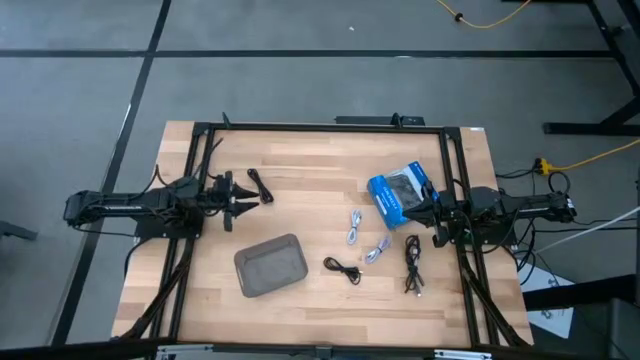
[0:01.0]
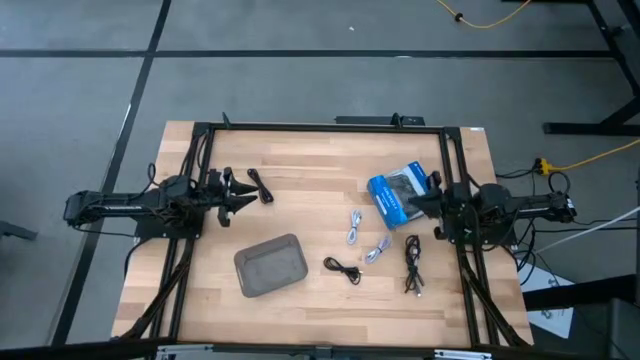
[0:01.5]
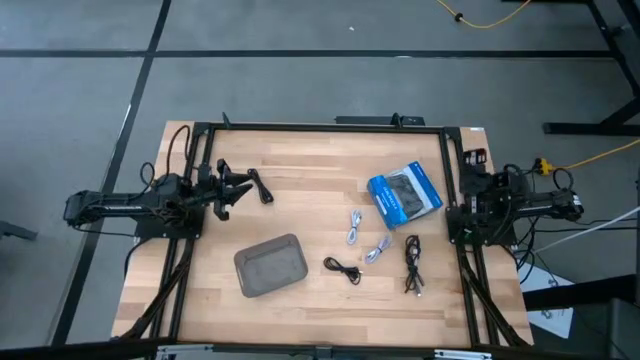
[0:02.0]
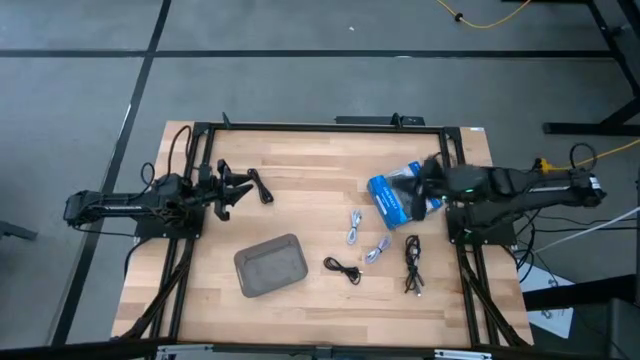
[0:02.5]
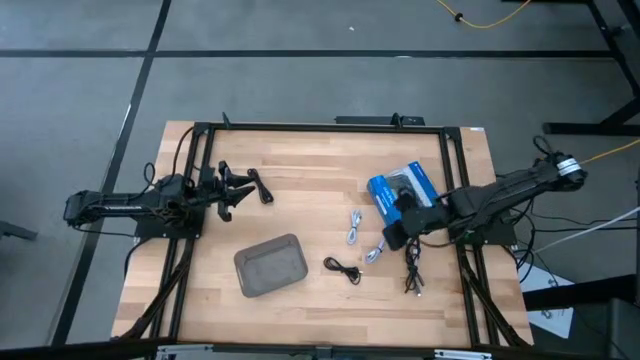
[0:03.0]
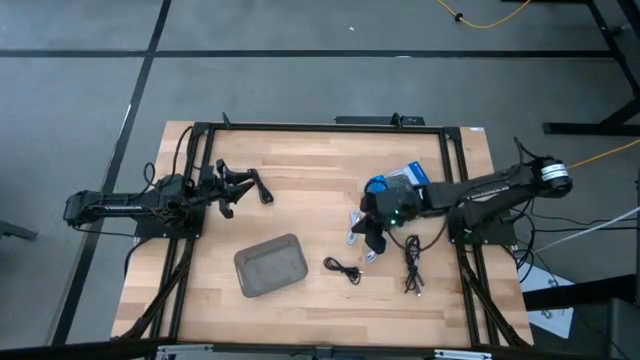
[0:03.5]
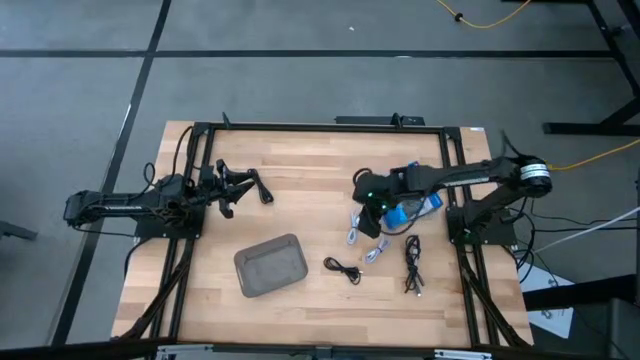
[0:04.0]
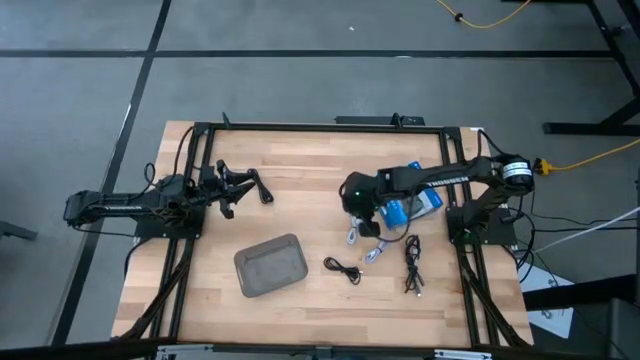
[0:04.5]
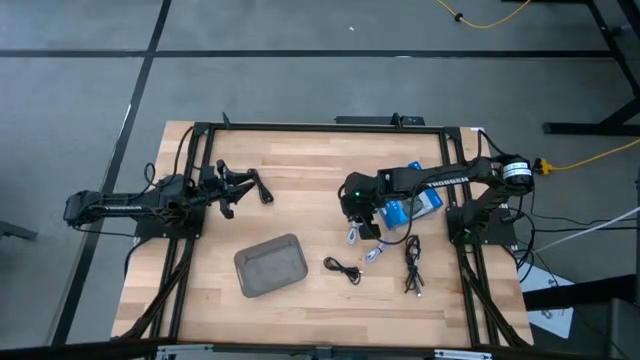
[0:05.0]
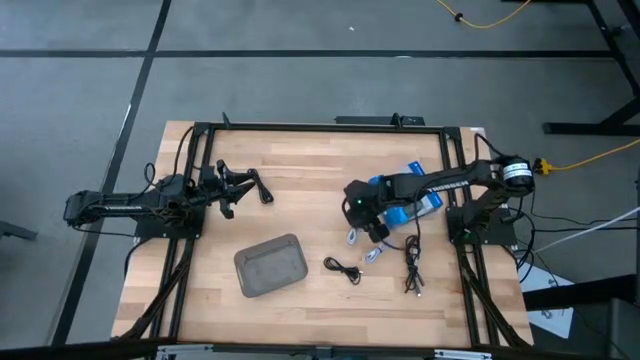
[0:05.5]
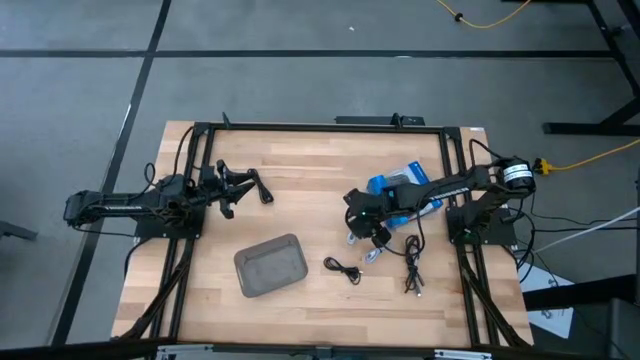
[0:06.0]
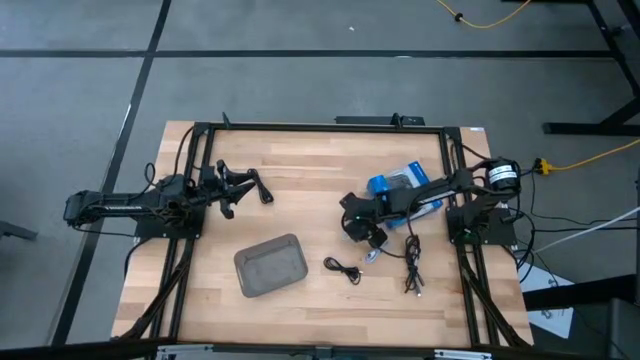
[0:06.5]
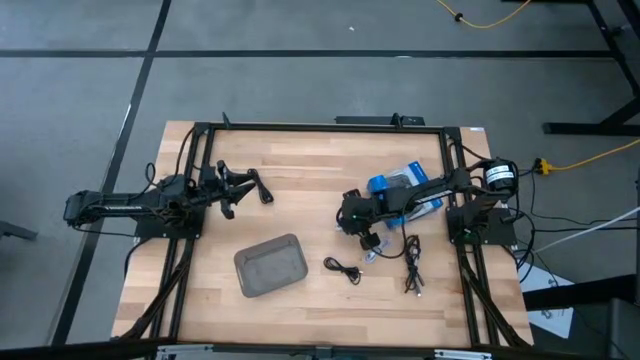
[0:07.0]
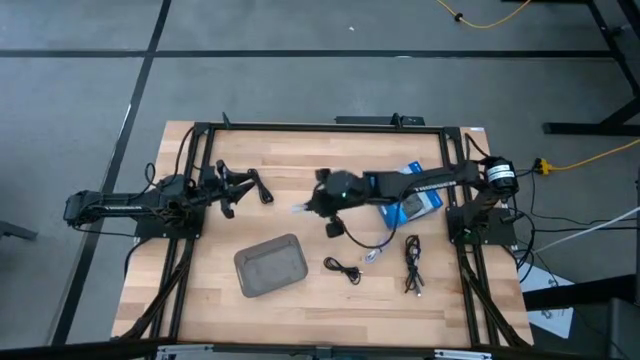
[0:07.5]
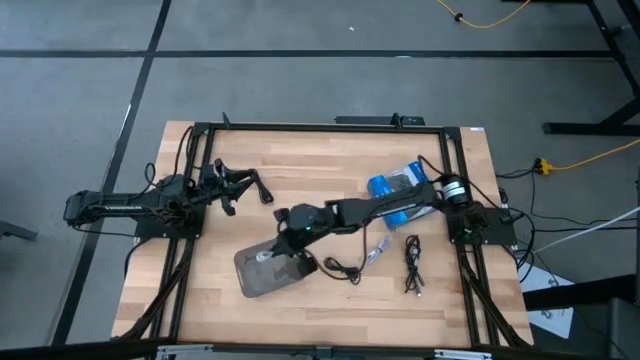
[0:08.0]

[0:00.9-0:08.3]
Task: Pick and place USB-C Cables
Put the white charger cable into the black bin

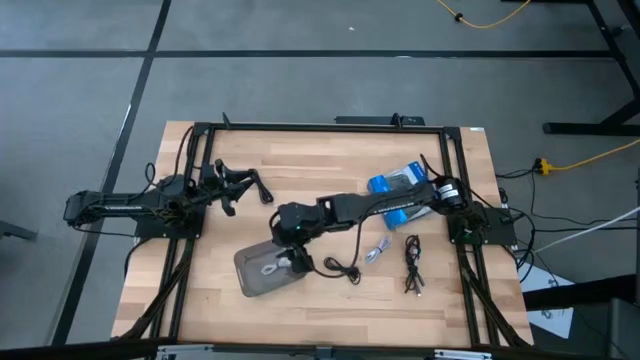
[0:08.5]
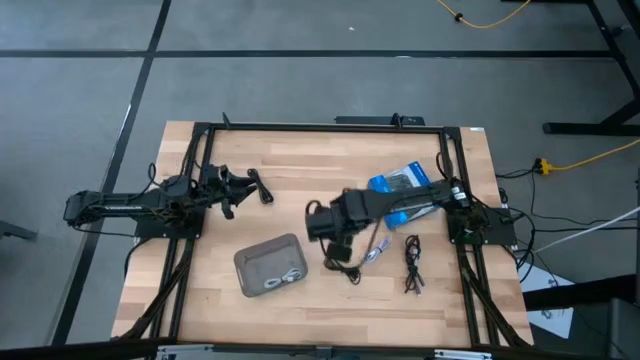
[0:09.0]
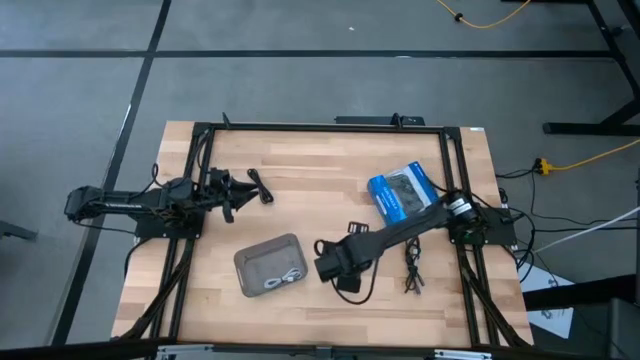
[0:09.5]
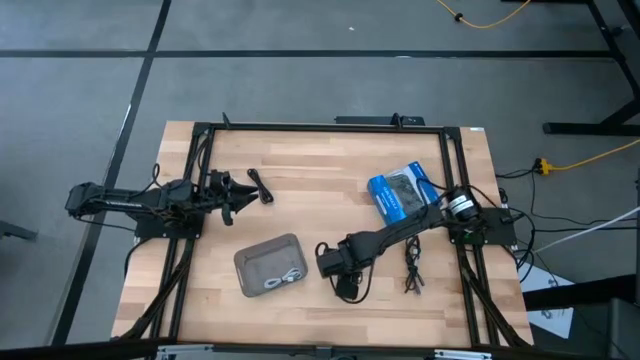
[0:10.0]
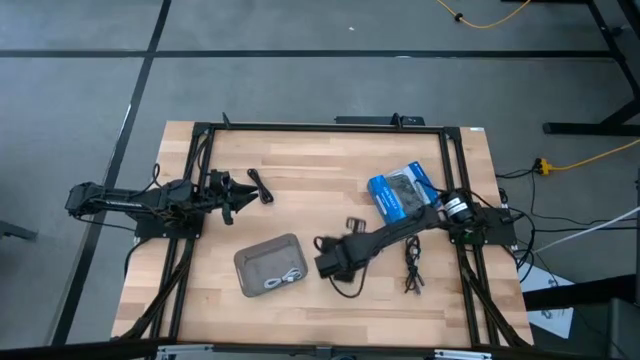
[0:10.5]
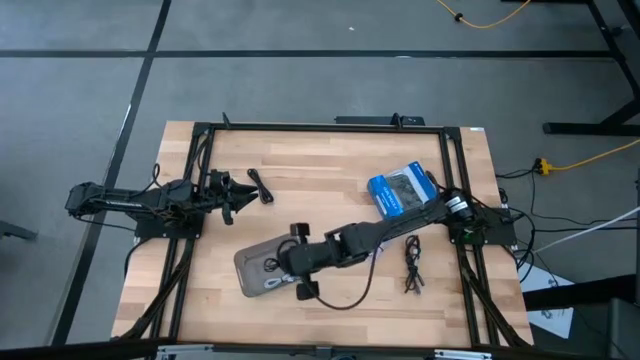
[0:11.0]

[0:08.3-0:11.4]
Put the bottom left black charger cable into the black bin

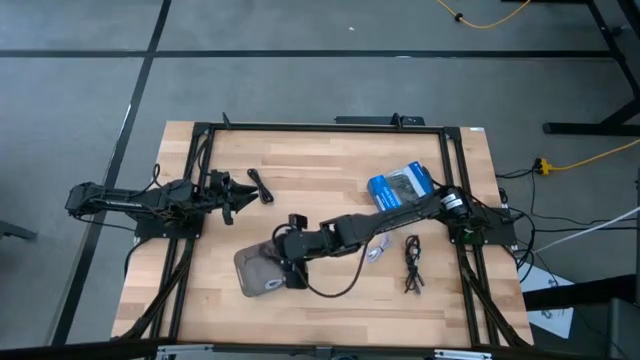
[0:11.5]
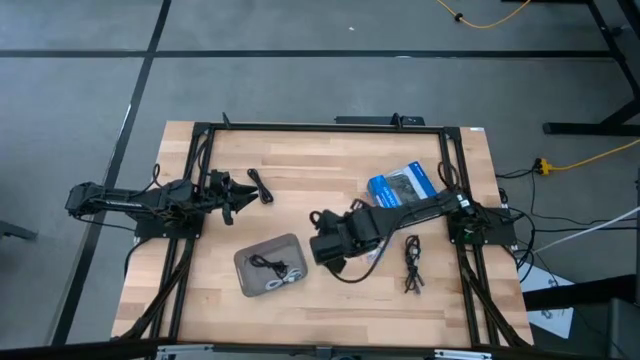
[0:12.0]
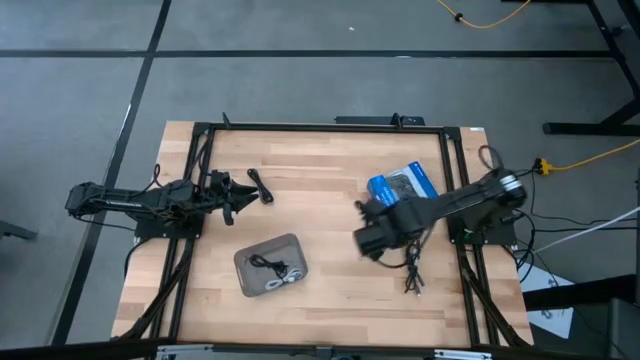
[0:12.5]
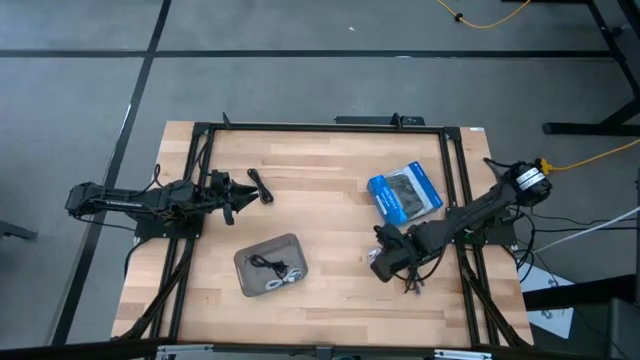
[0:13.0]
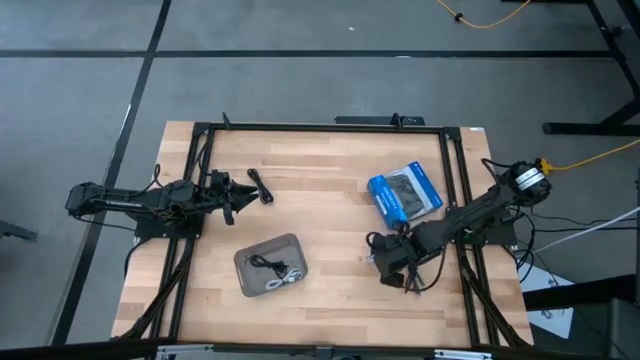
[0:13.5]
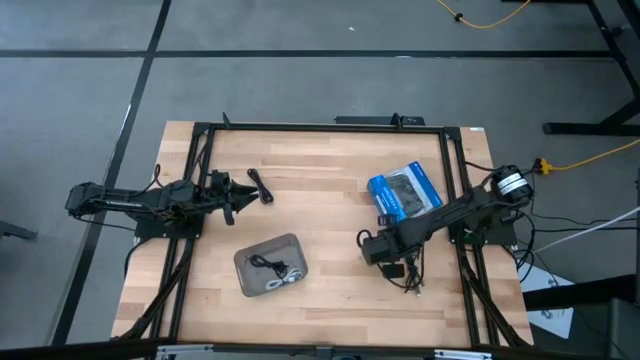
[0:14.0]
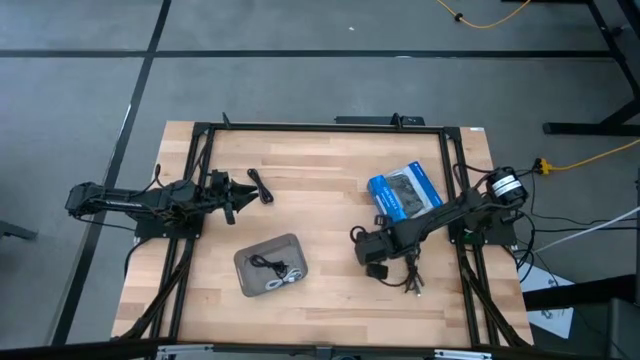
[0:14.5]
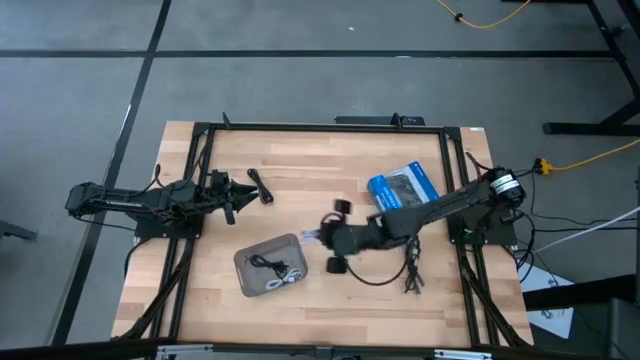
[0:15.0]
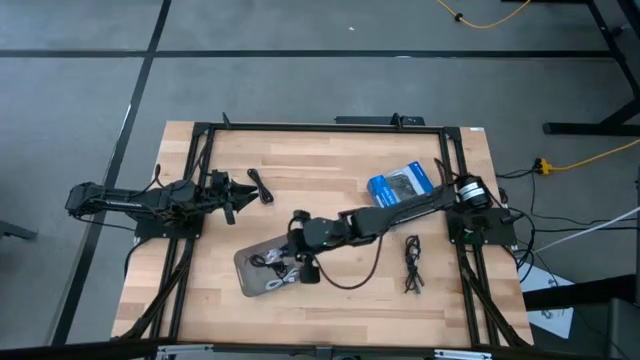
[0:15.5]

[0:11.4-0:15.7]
Put the purple charger cable into the black bin

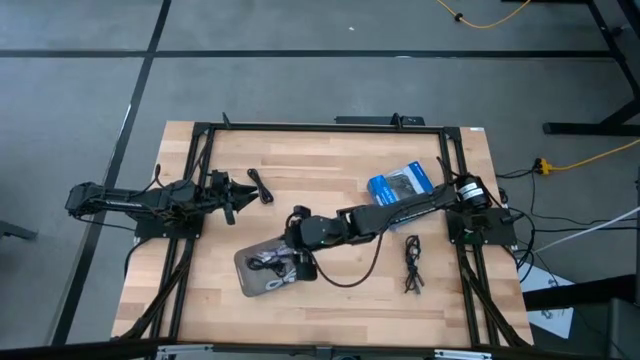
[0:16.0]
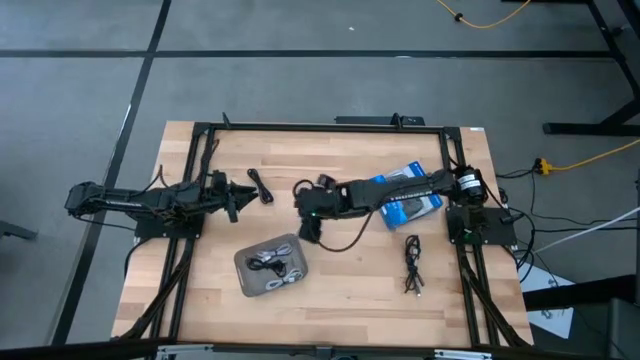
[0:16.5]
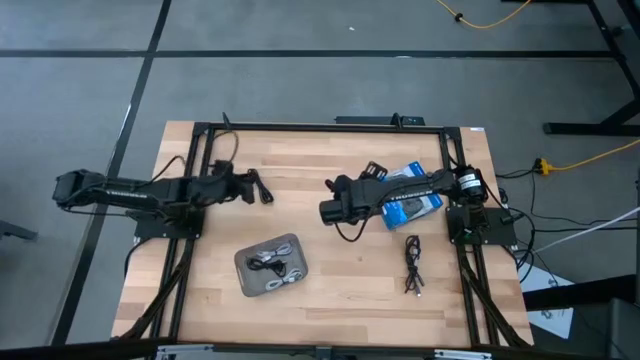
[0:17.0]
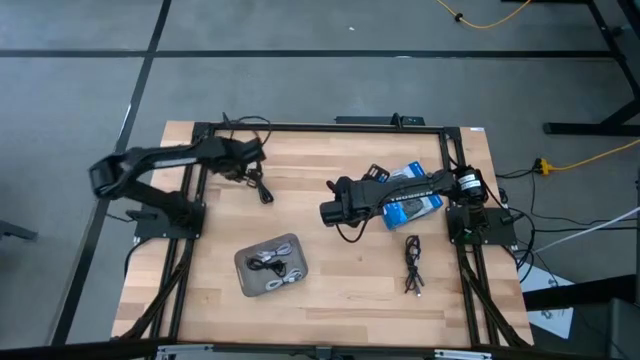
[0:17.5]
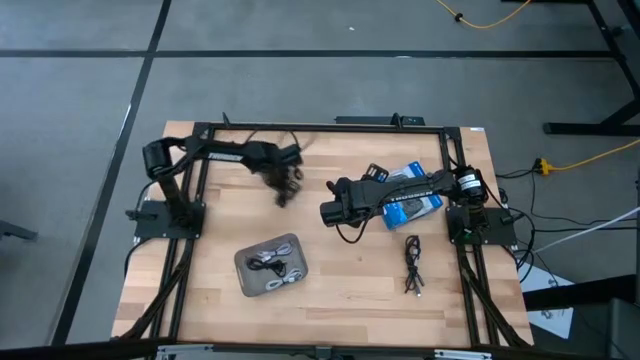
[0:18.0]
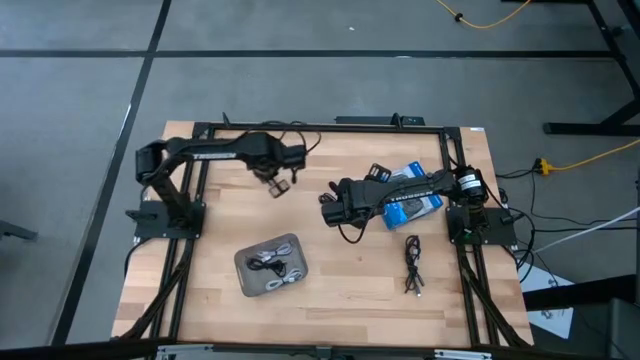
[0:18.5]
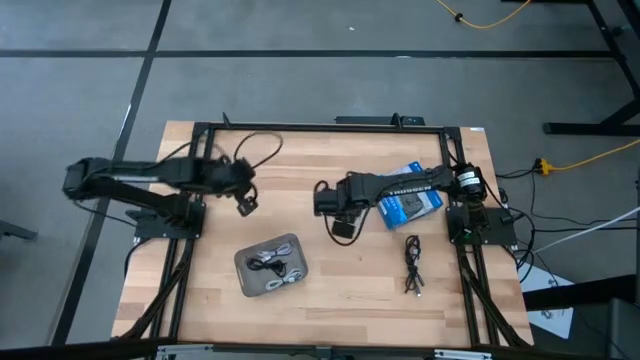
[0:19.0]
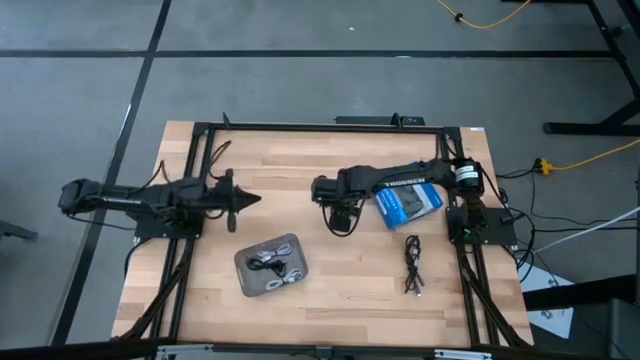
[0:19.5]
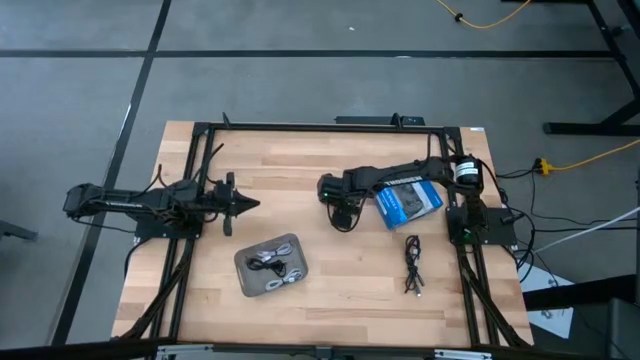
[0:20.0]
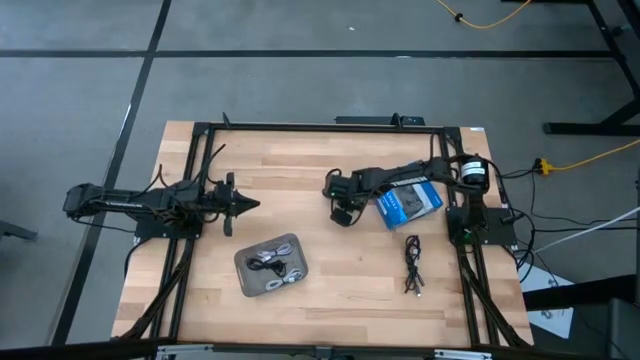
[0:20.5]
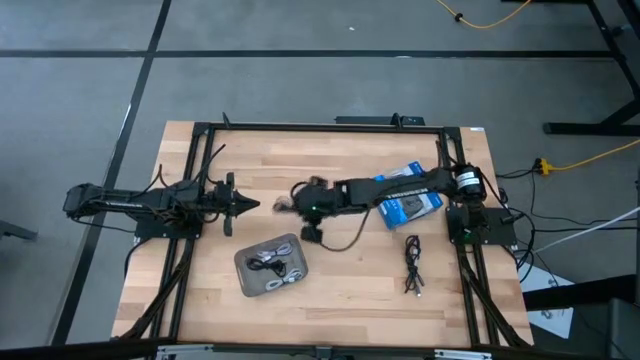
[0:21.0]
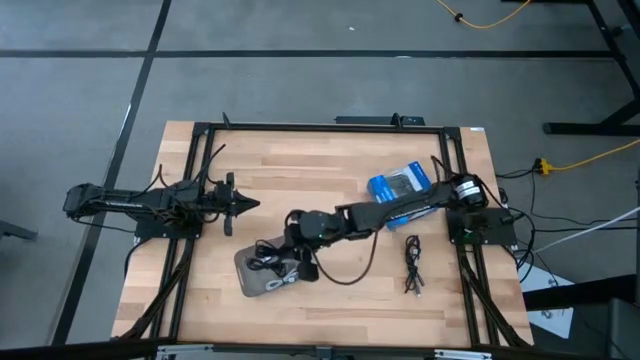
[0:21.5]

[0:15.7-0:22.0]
Put the top black charger cable into the black bin
